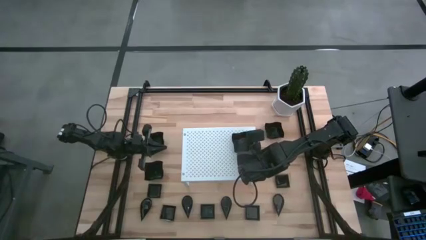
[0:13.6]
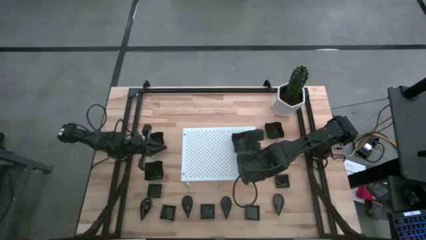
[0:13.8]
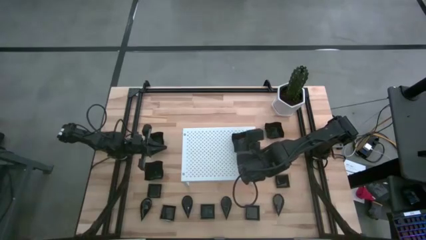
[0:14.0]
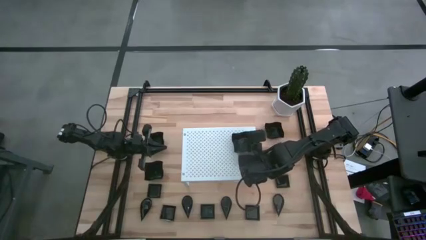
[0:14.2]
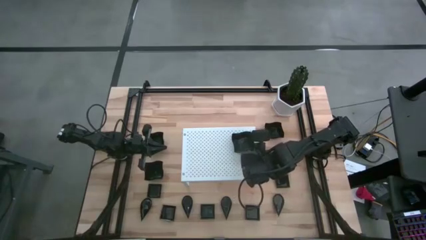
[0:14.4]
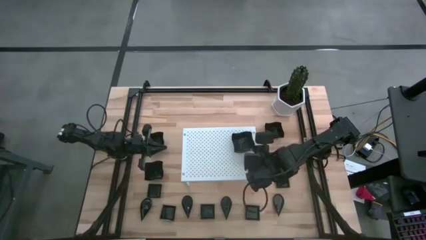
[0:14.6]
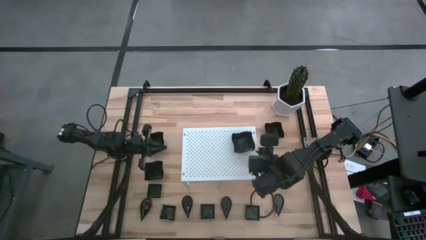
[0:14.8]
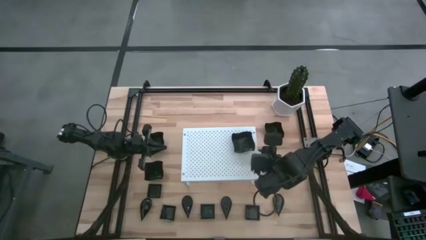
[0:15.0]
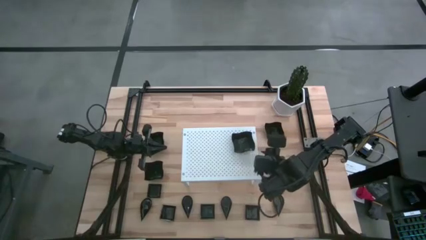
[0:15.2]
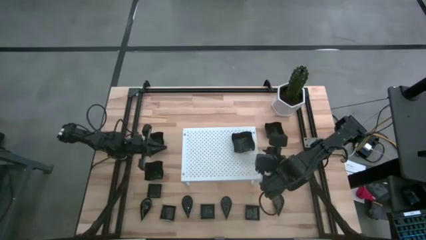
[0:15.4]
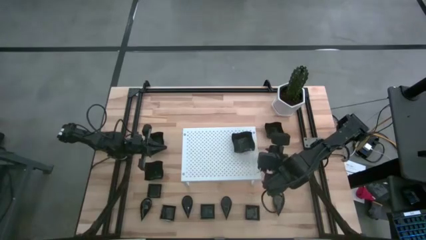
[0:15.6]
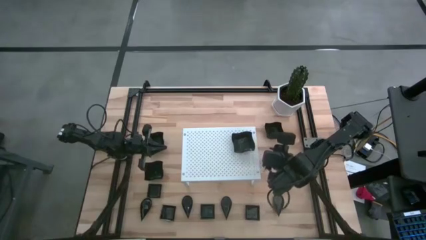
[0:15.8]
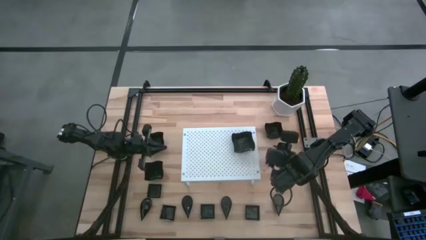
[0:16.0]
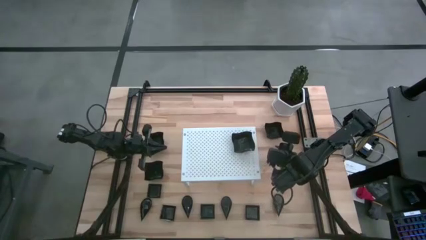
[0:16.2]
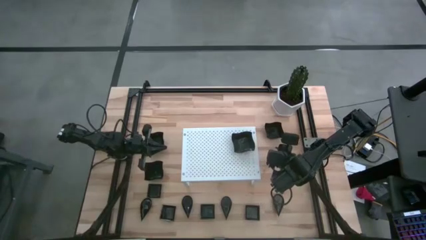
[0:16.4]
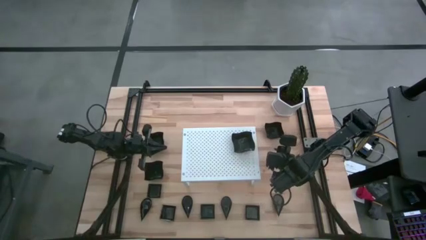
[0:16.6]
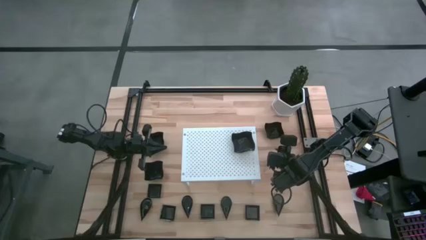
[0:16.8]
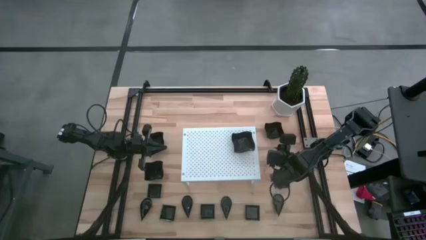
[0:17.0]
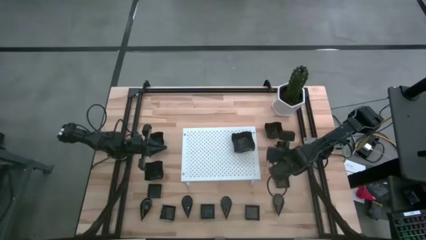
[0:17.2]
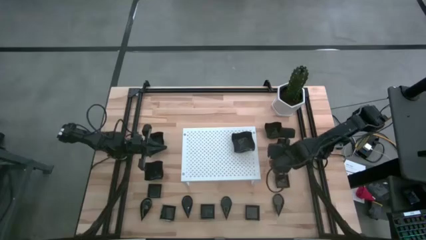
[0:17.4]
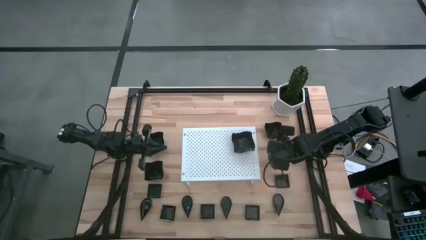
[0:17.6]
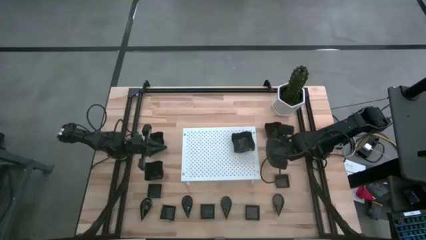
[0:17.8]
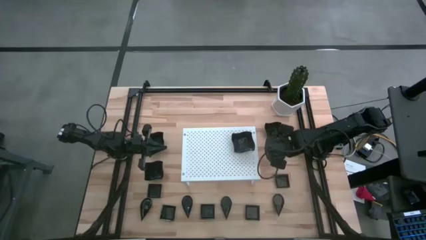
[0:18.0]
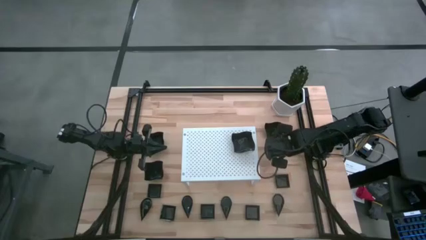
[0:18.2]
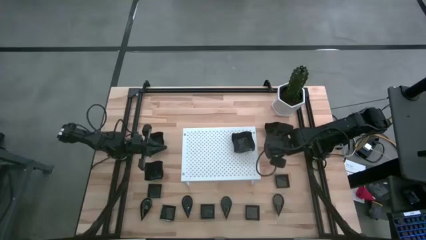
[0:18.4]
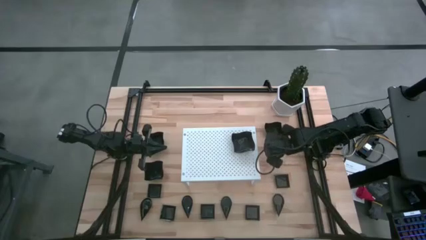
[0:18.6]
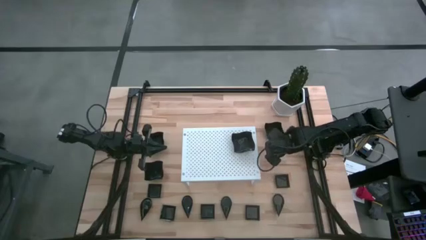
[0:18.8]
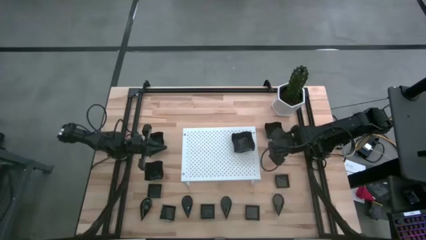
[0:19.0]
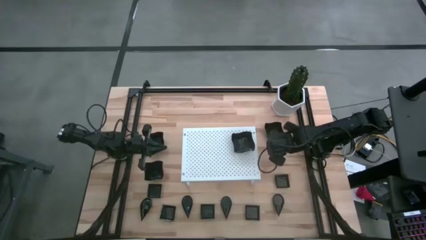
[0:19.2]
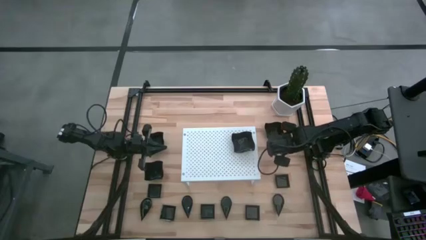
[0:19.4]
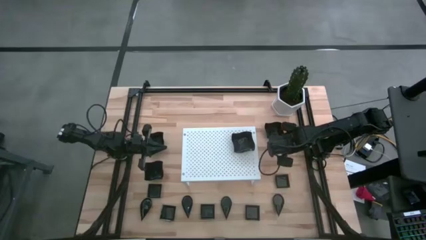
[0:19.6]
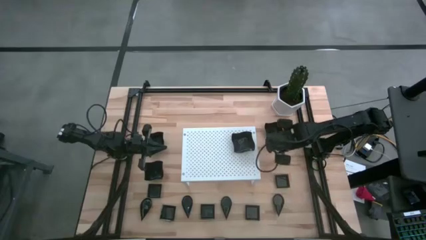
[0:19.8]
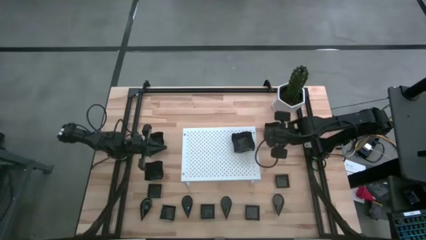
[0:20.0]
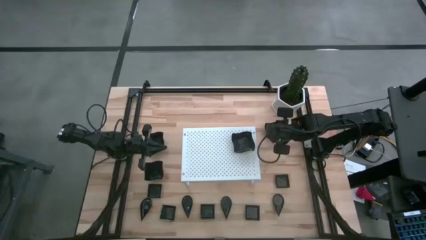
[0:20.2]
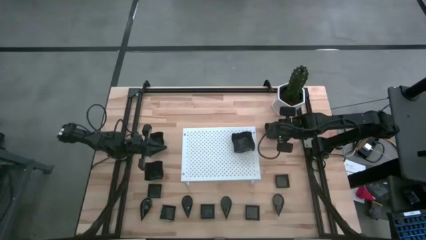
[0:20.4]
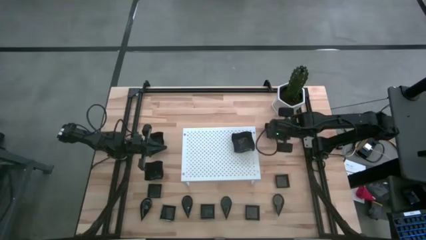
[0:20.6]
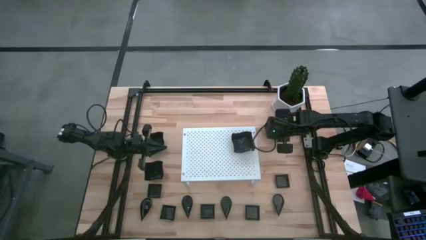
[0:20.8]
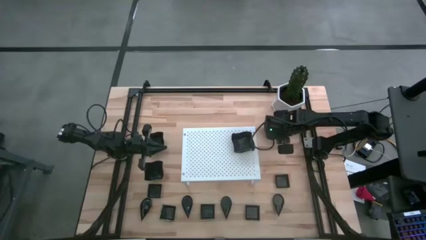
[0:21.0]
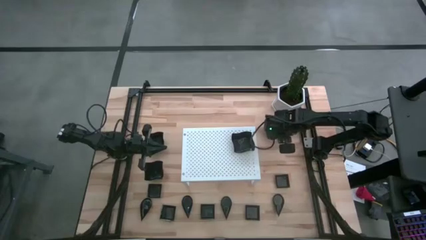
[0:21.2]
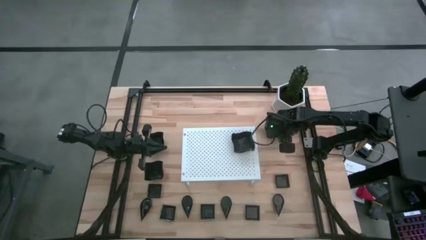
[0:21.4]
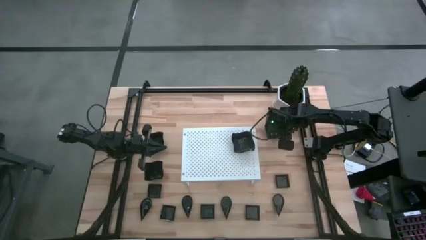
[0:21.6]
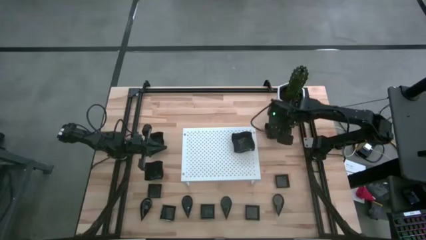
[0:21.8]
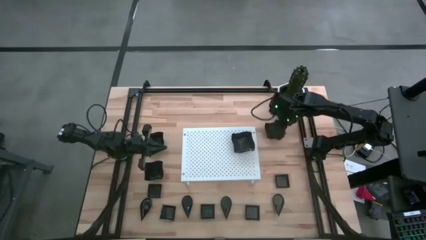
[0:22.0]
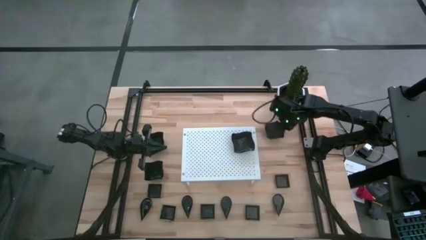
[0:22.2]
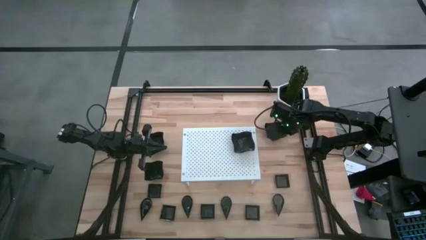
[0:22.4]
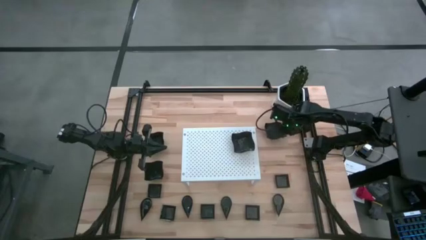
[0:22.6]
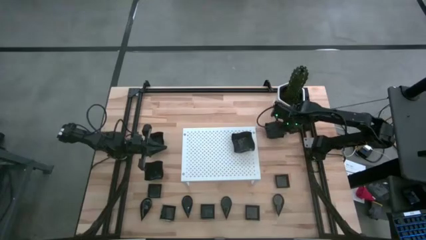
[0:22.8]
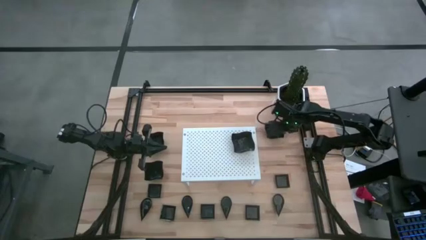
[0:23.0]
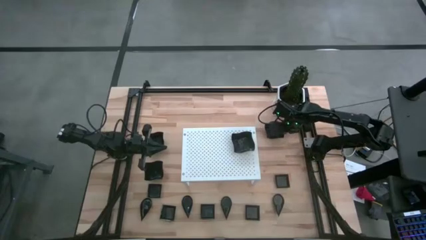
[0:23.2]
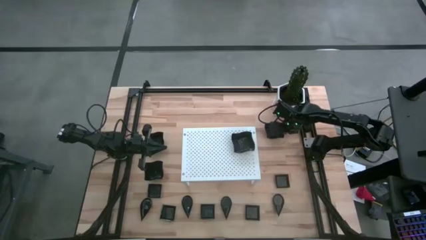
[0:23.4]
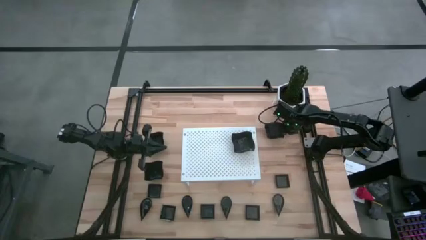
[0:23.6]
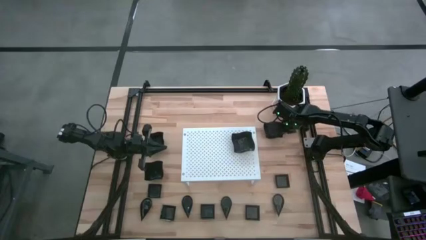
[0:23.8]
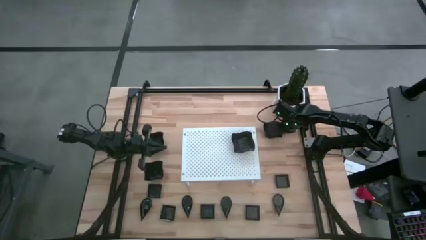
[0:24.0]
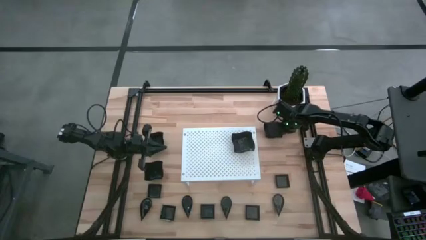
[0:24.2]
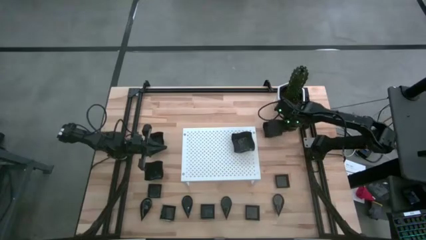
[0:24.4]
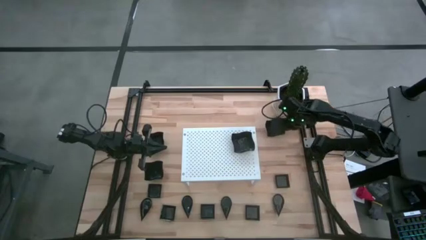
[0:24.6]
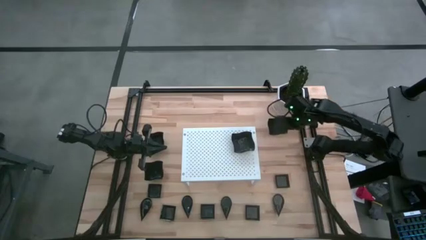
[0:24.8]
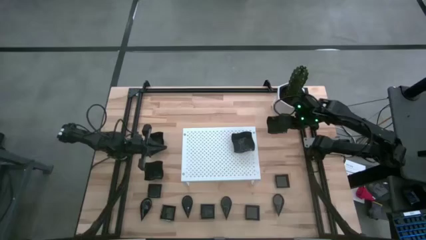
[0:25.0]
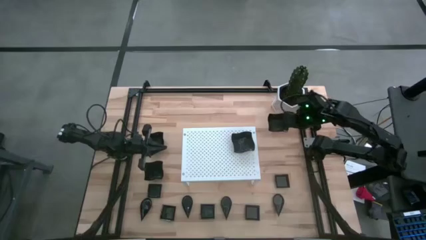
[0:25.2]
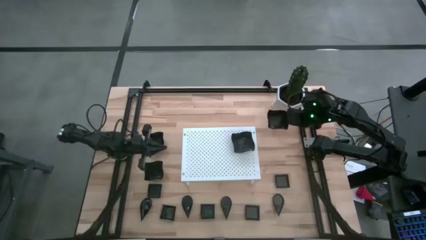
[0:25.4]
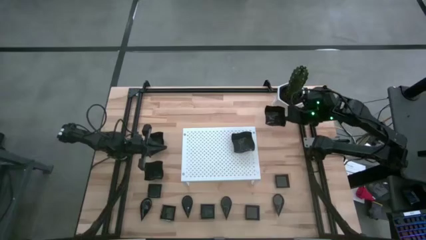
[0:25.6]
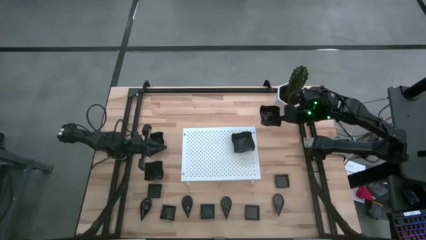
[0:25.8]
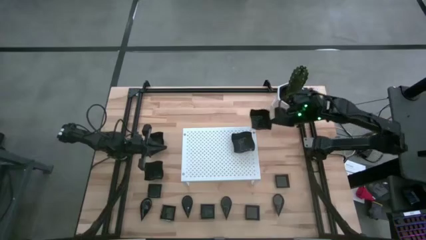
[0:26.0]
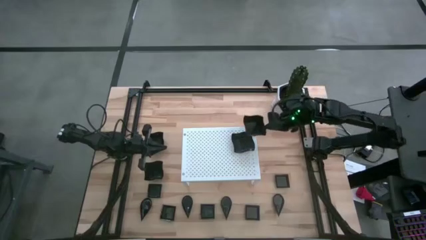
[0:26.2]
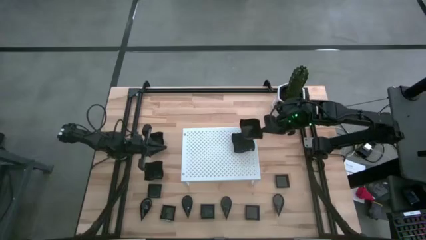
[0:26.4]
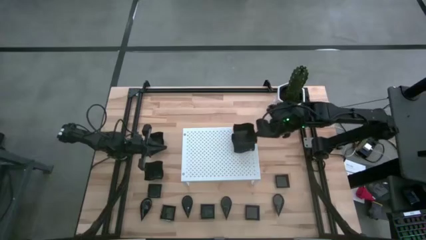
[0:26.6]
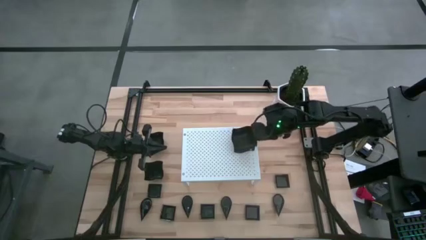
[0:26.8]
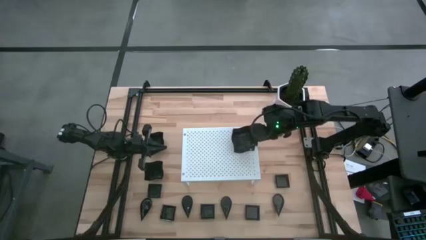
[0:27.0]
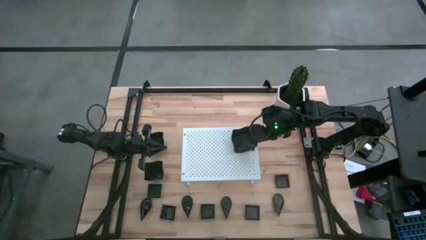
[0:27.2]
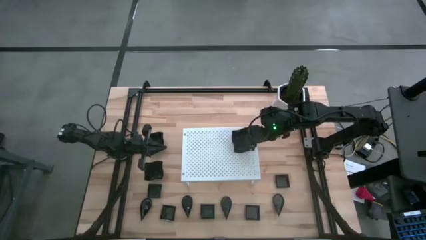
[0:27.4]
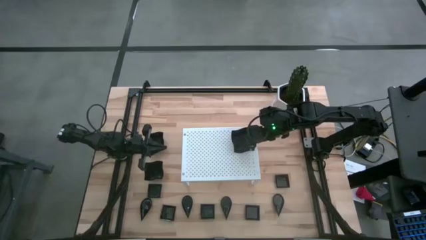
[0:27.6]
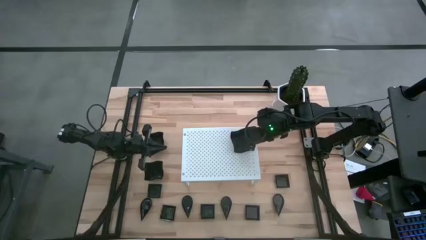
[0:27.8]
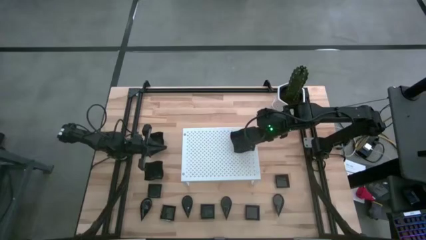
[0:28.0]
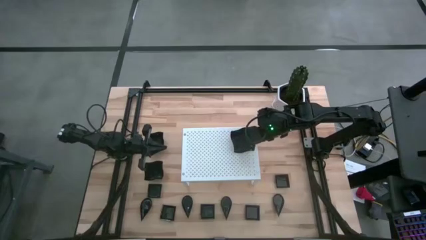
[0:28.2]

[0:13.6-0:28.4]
Task: Pick & Place Mini shaped plates
Stack the distorted square plate on the other distorted square plate on the shelf

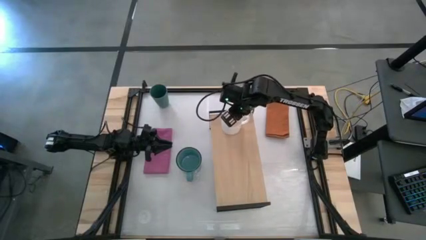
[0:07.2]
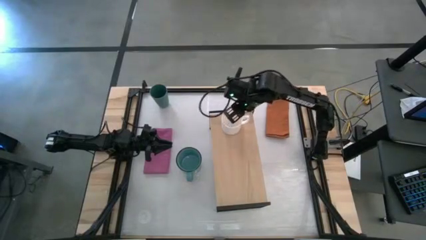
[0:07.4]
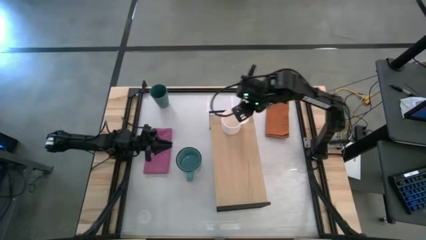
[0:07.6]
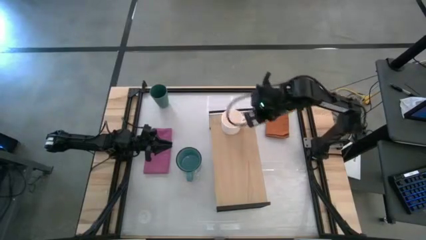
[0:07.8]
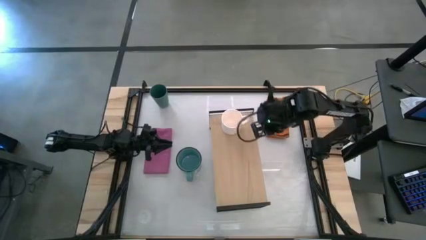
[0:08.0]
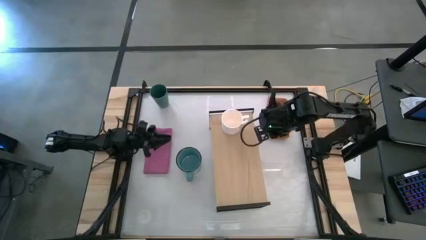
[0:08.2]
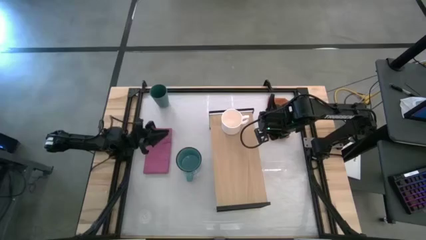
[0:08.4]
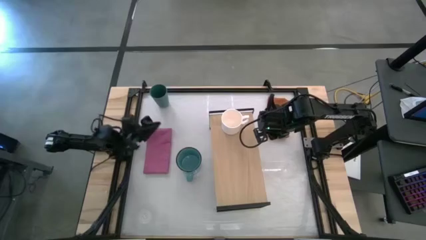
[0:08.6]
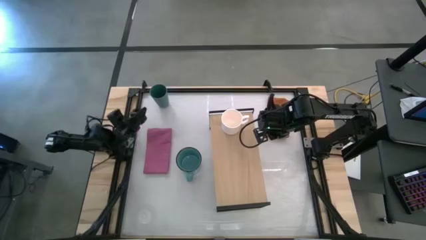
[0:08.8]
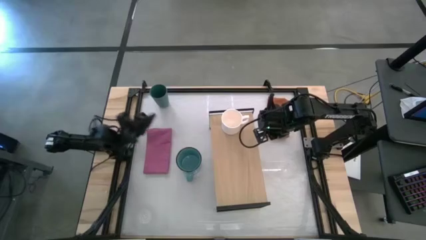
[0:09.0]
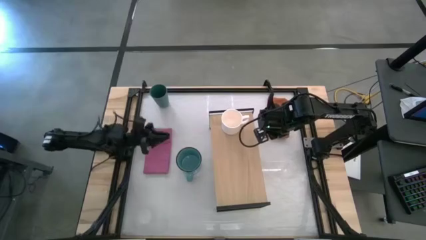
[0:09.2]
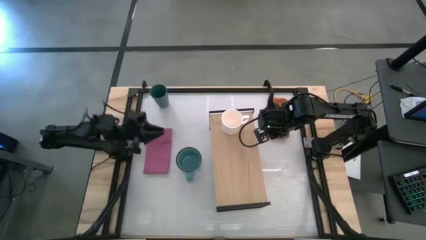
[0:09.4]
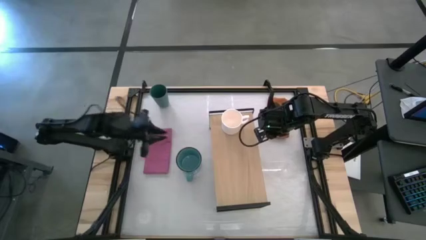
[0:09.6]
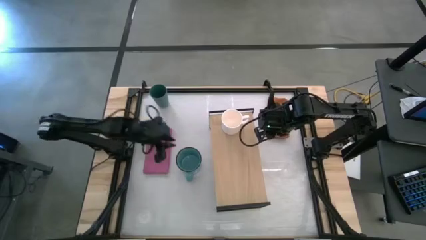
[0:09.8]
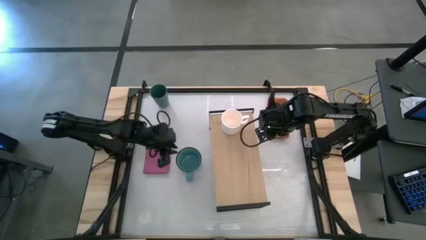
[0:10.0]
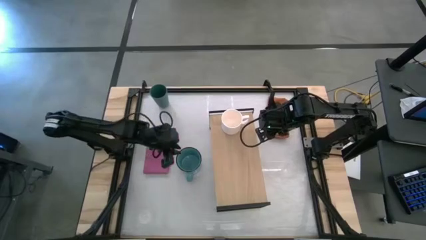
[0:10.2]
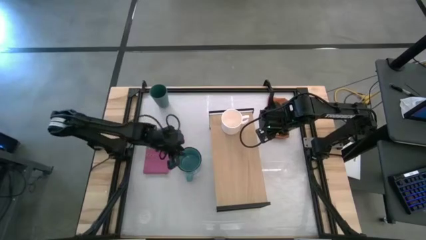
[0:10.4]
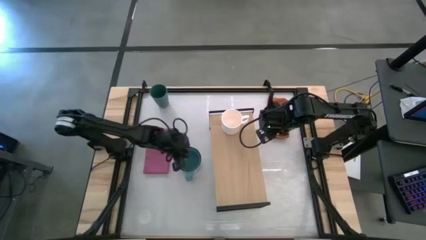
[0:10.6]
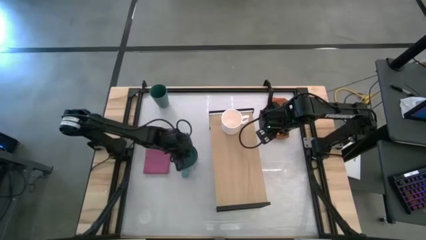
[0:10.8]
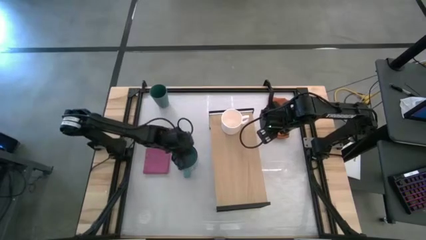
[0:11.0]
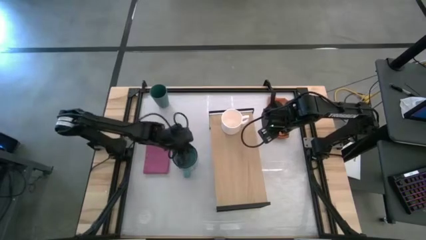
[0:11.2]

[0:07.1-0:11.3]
Task: Stack small to large cups/mugs on shelf
Put the blue mug on the shelf
